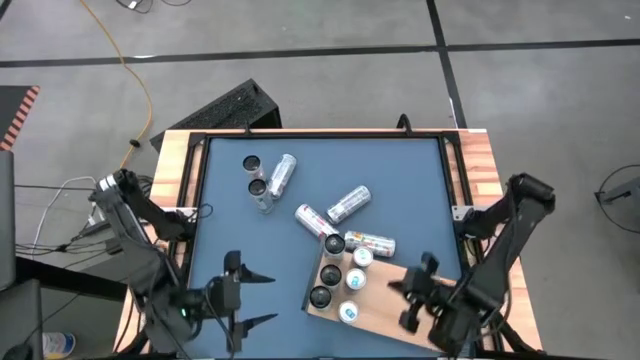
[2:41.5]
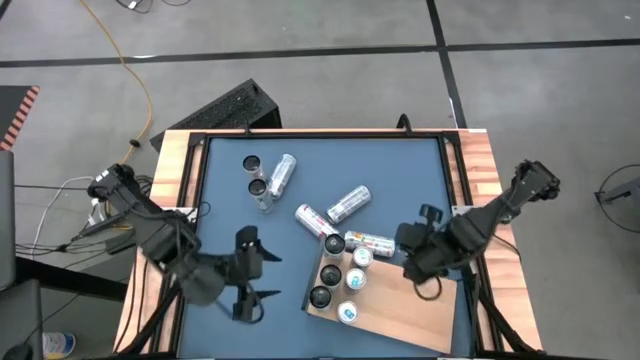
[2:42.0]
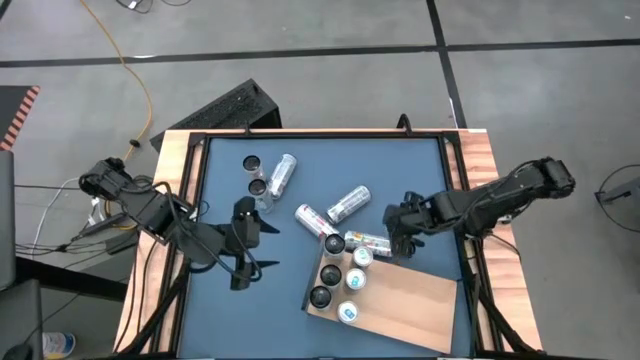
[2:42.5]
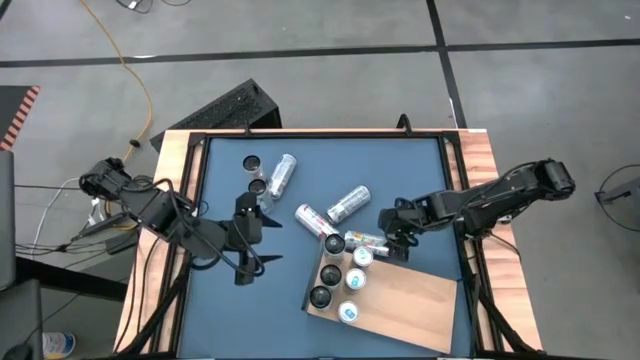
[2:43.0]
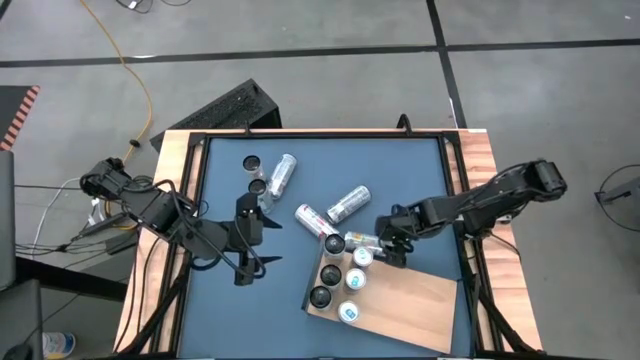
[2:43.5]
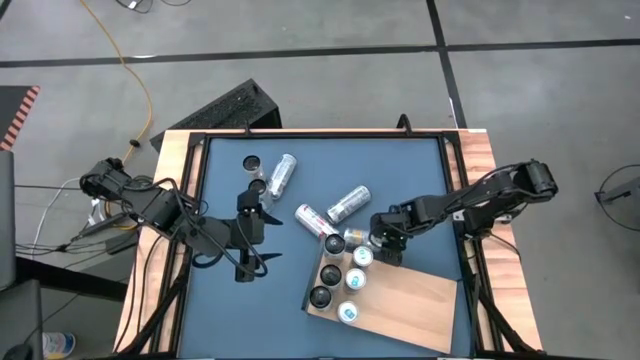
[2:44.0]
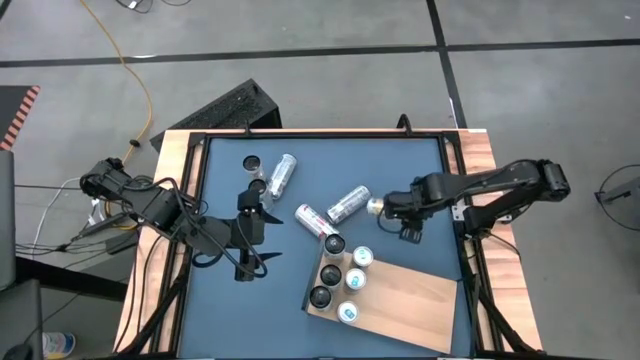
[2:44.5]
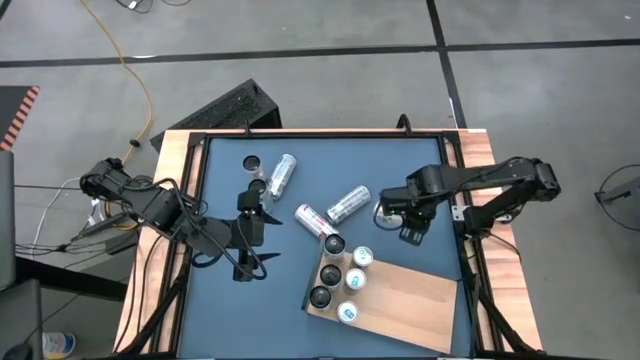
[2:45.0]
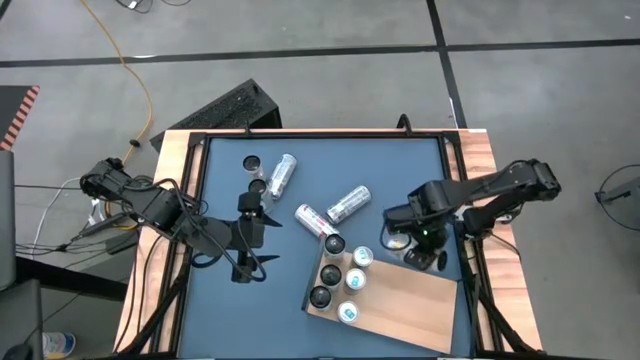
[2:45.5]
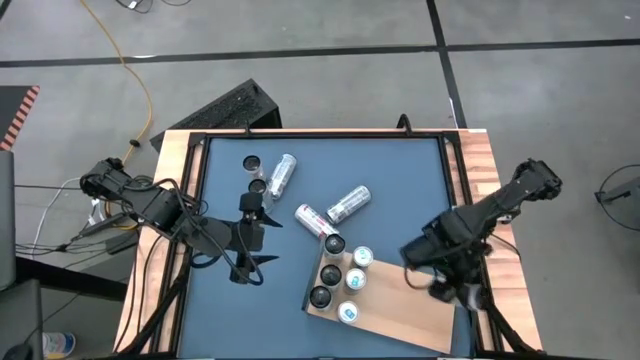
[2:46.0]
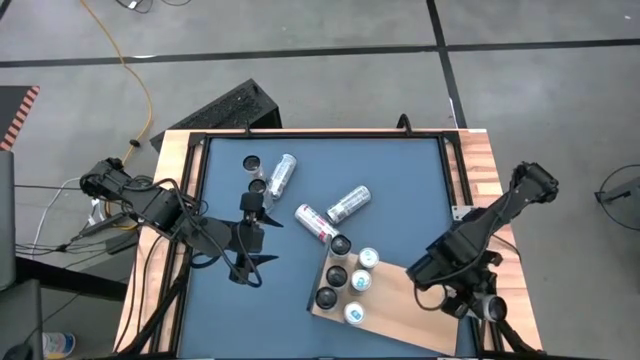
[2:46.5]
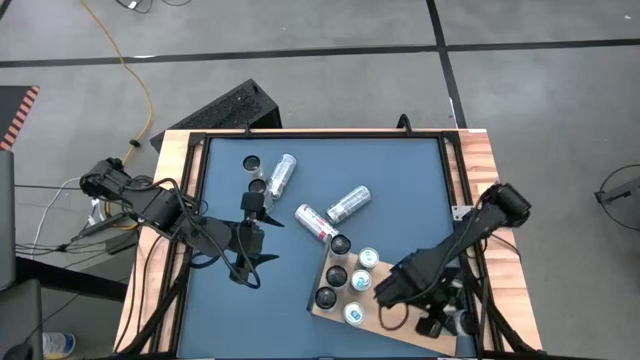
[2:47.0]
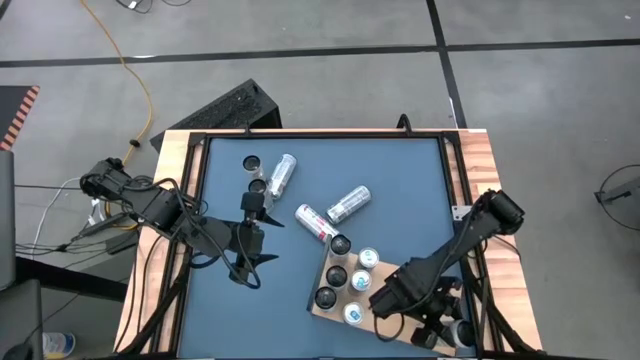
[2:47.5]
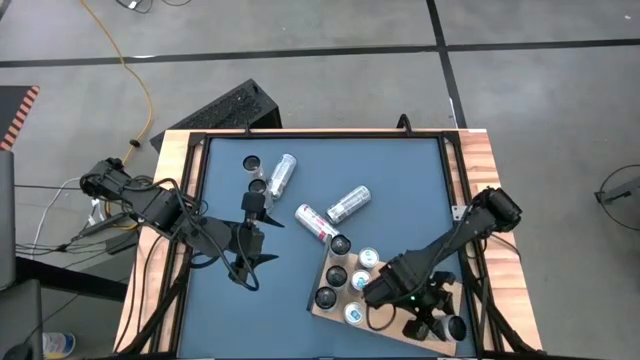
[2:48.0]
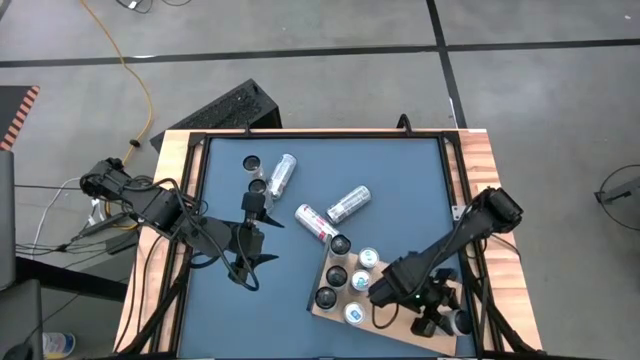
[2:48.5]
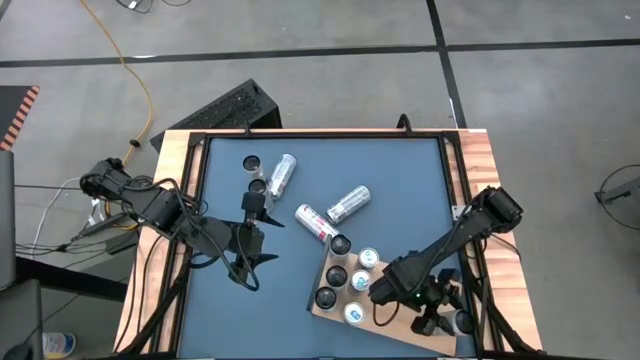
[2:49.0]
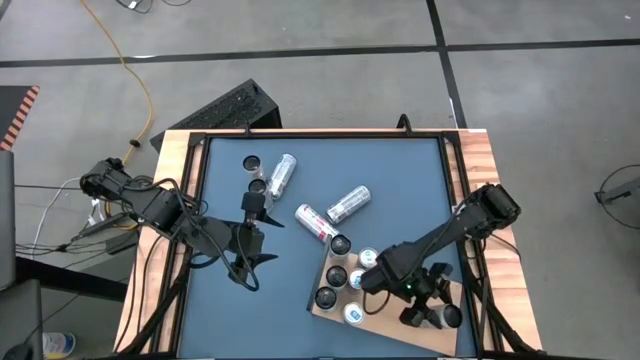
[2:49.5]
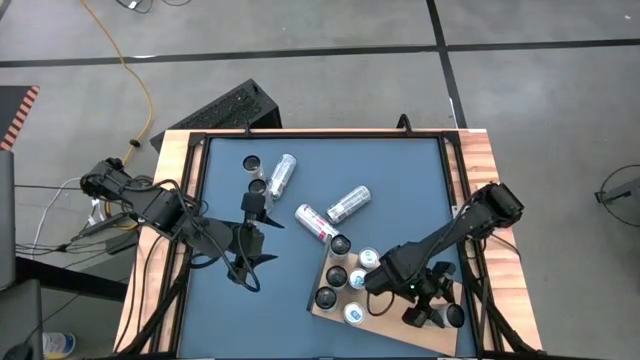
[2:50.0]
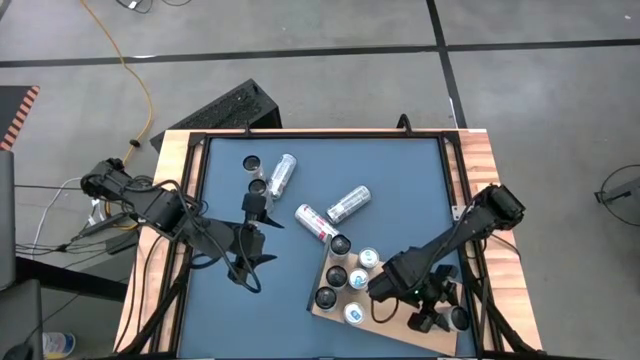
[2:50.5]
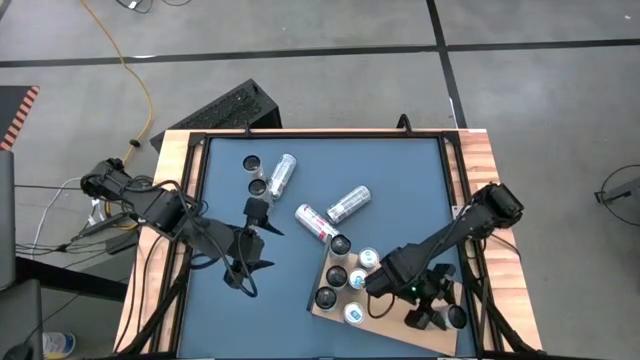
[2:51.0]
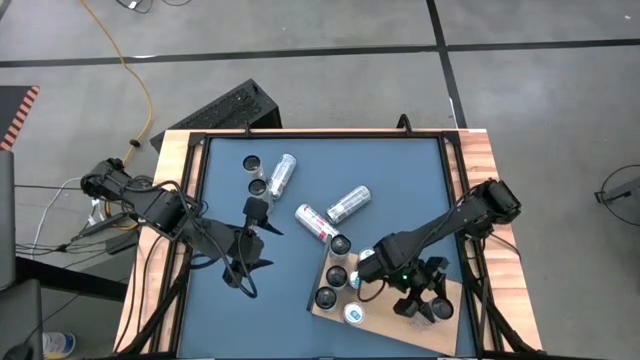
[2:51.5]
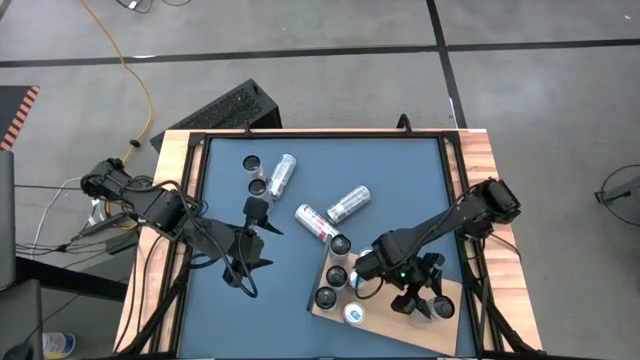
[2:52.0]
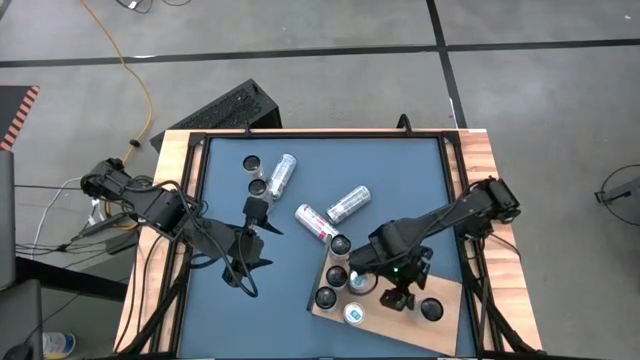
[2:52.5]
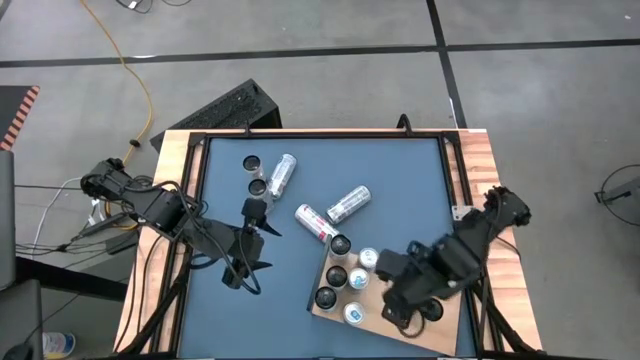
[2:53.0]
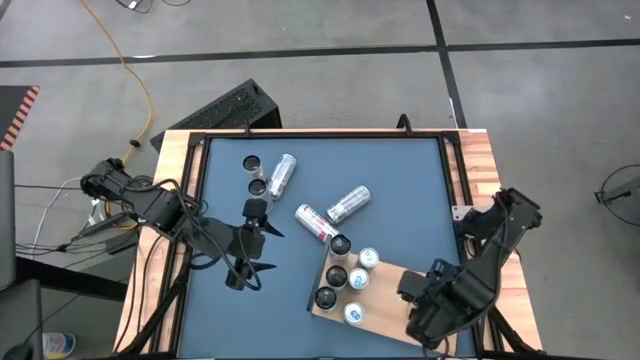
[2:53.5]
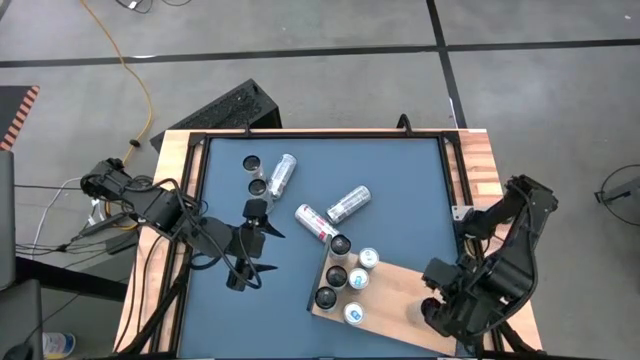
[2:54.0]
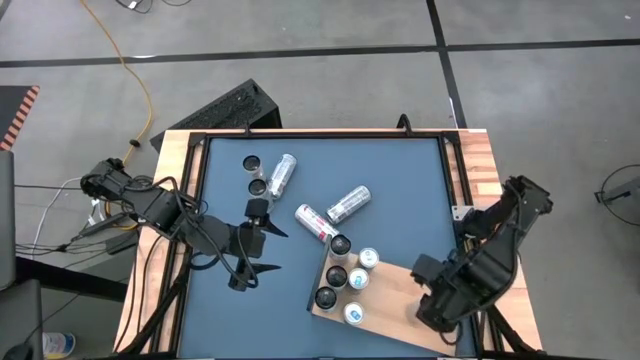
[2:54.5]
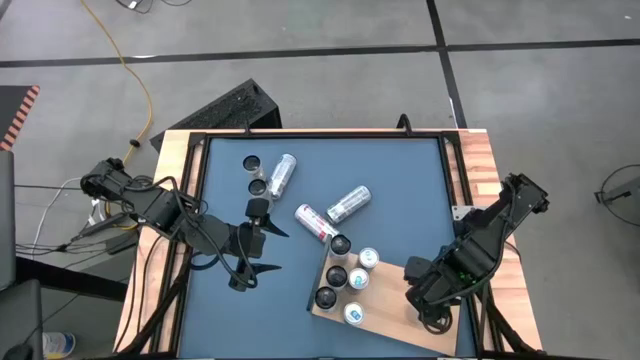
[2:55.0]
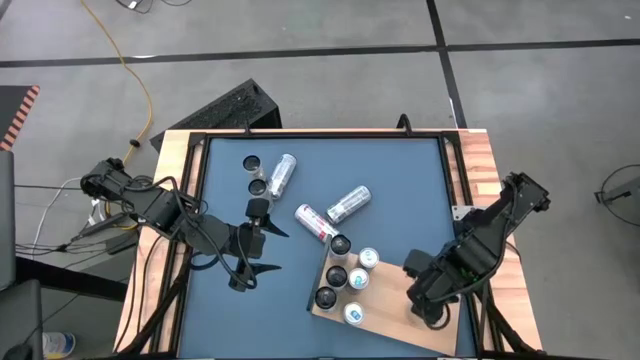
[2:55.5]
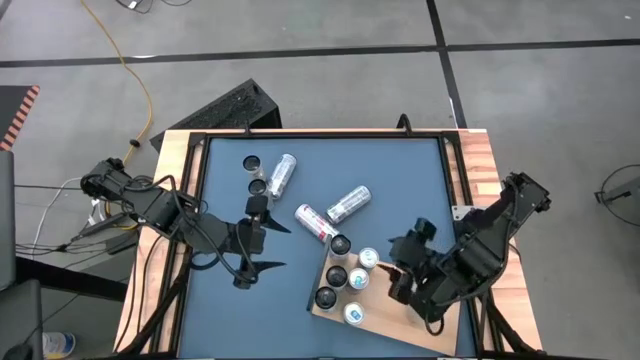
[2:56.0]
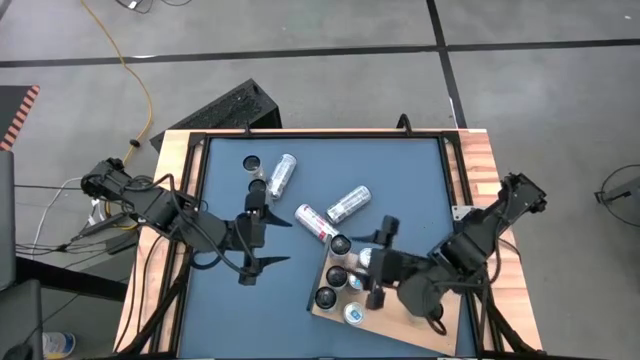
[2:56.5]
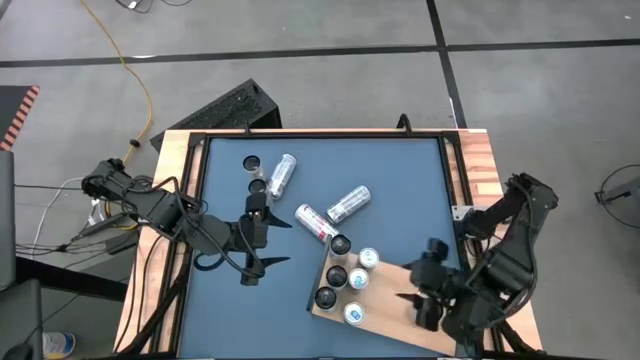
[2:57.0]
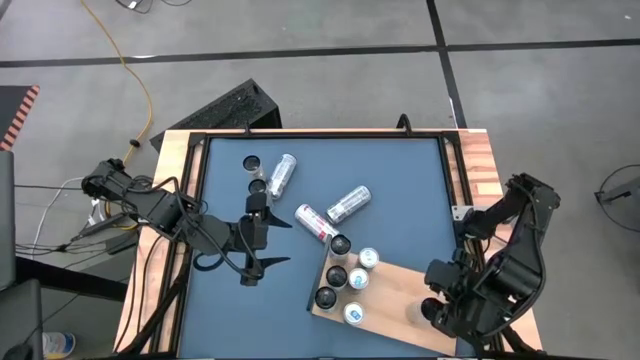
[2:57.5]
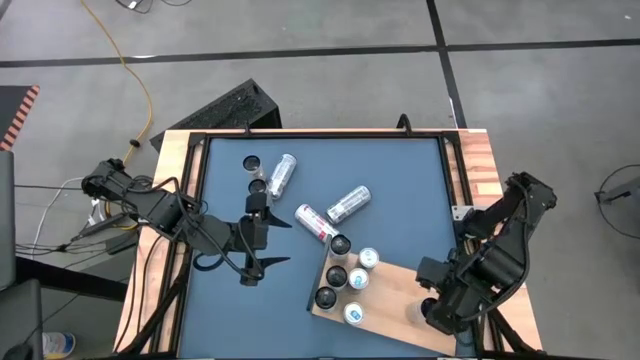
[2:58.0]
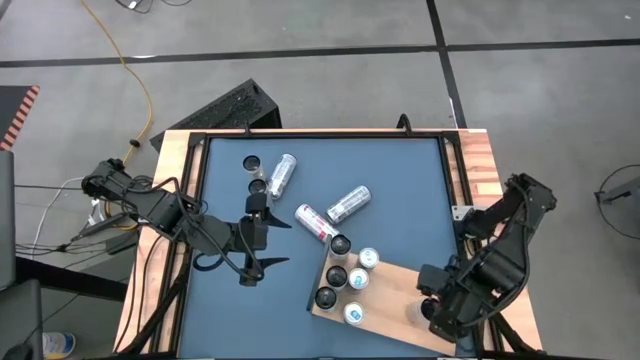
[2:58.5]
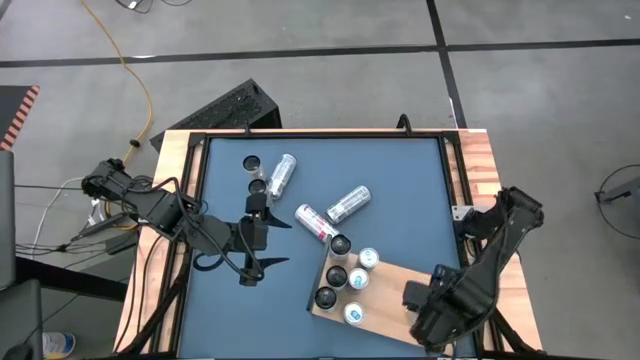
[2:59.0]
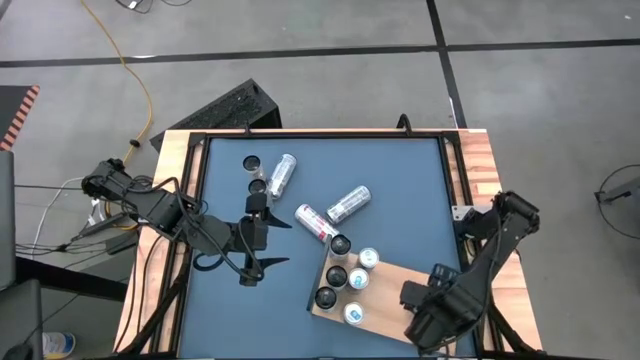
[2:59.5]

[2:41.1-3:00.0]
Task: Place canned beverage on shelf
Put the bottom white yellow soda can on the shelf

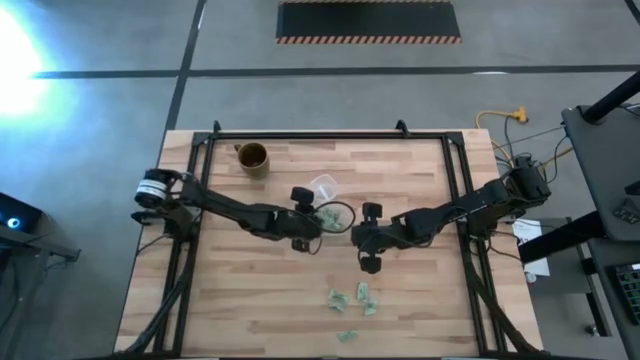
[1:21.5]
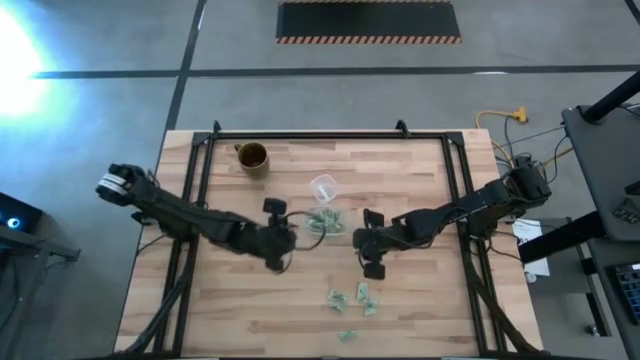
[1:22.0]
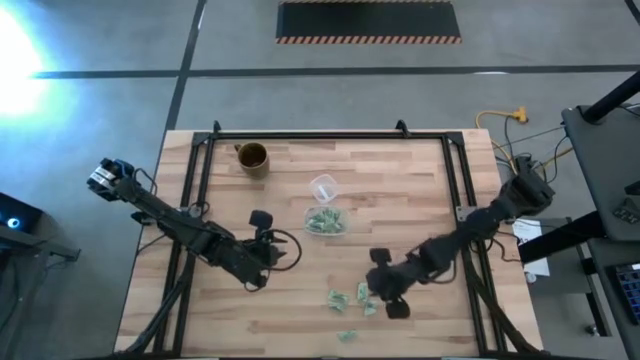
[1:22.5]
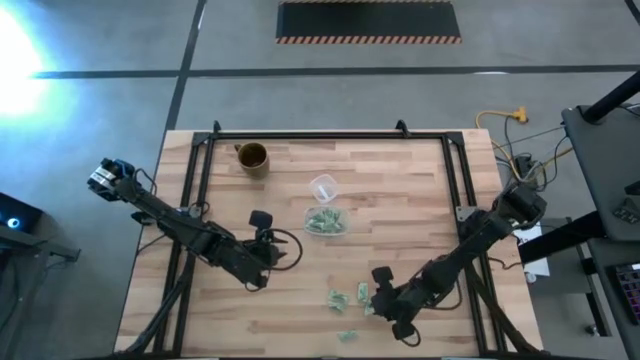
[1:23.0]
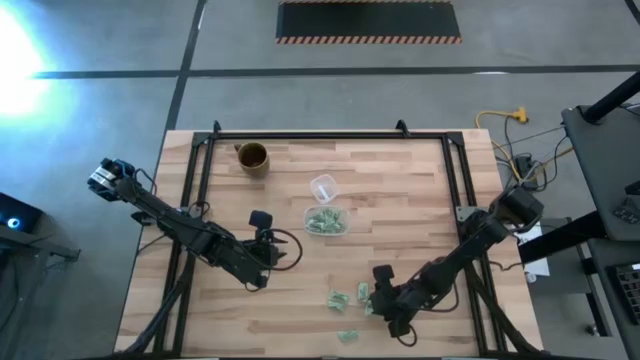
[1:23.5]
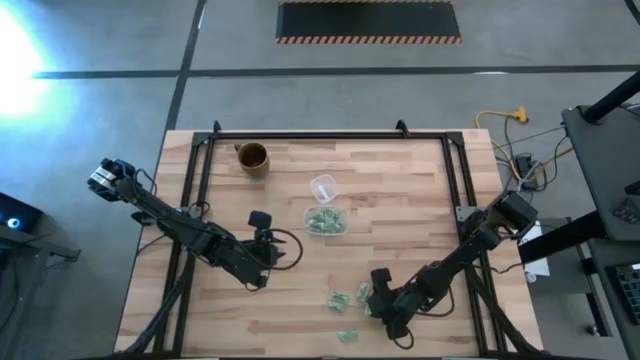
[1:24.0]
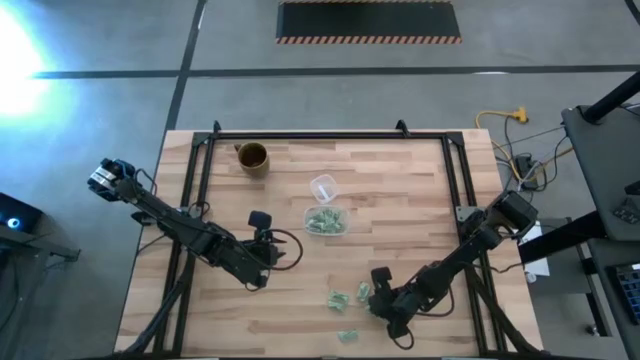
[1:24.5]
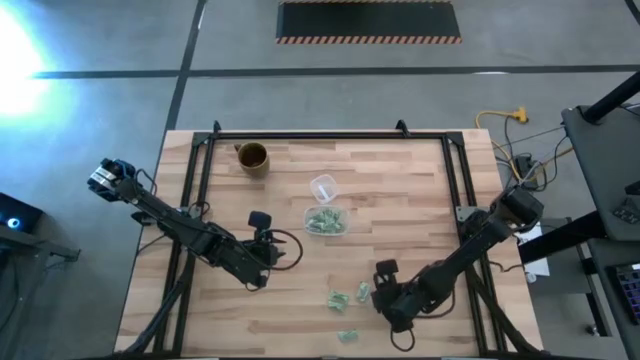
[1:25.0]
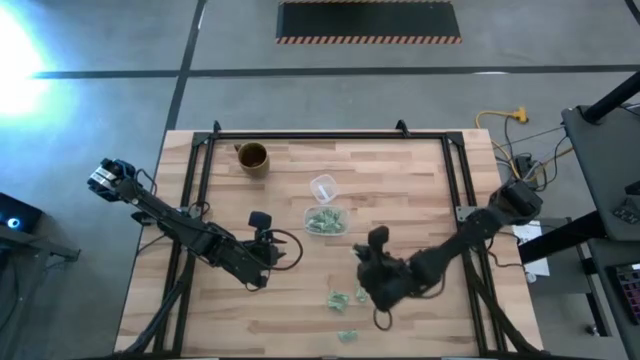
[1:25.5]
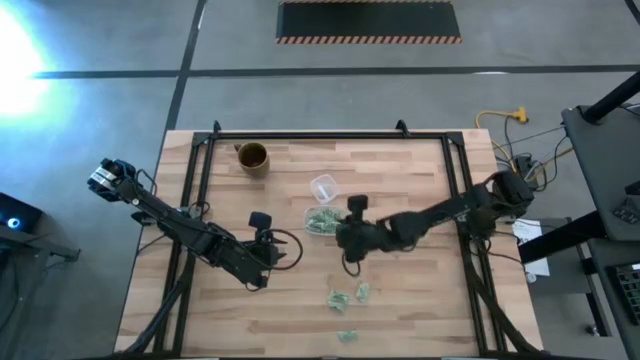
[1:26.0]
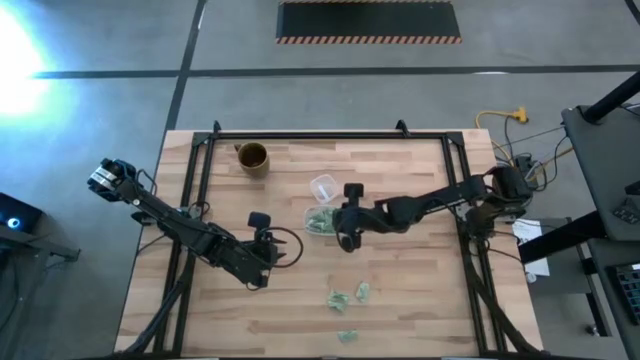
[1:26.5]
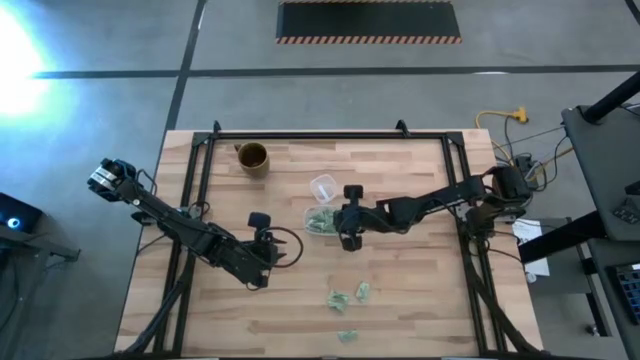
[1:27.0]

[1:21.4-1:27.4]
Task: Pick and place Stevia / Truvia into bins
Put the stevia packet into the bottom transparent container
